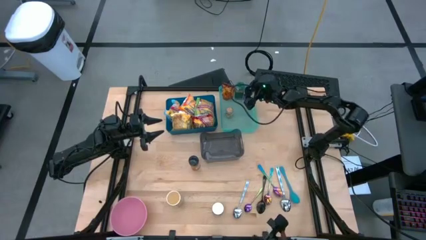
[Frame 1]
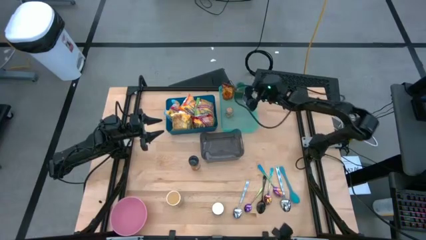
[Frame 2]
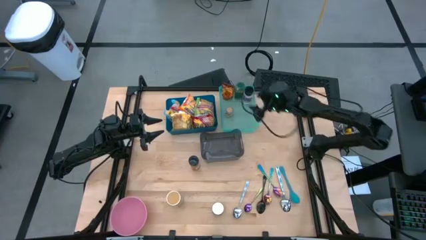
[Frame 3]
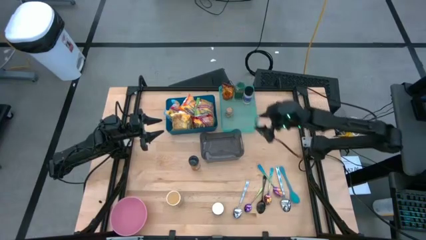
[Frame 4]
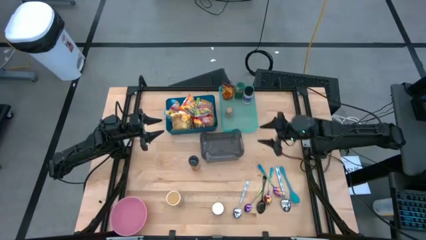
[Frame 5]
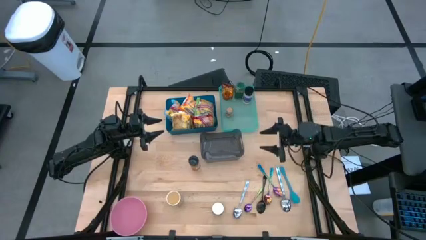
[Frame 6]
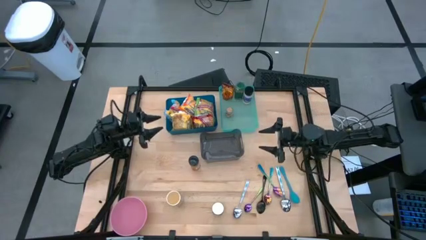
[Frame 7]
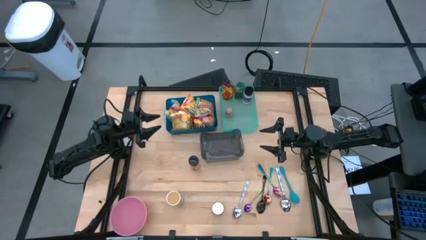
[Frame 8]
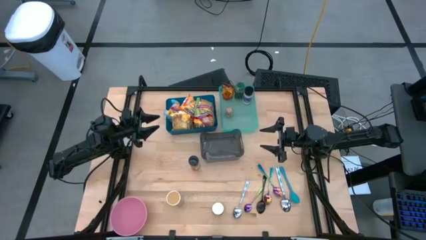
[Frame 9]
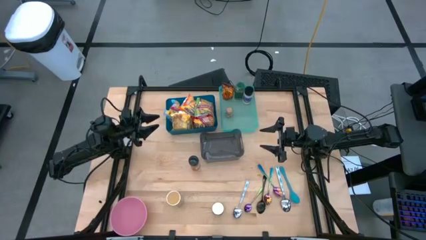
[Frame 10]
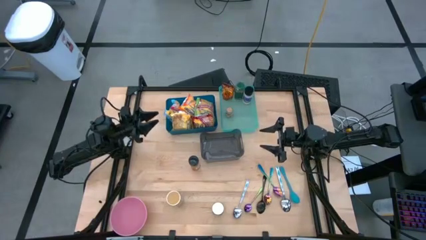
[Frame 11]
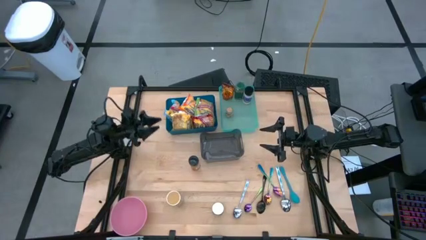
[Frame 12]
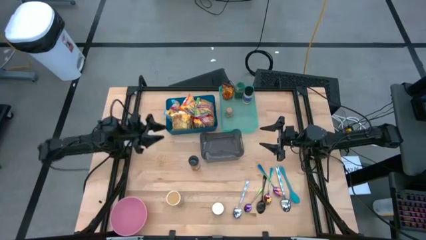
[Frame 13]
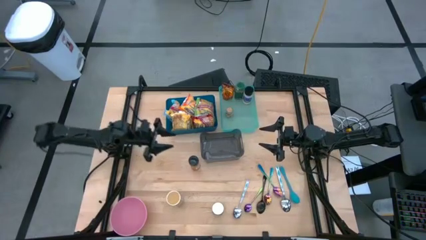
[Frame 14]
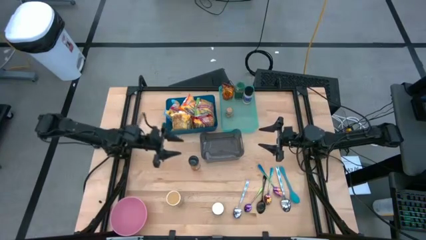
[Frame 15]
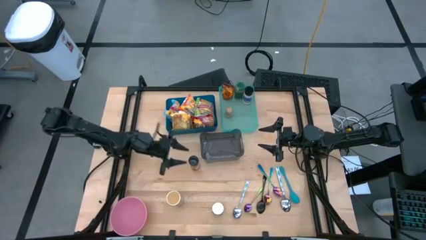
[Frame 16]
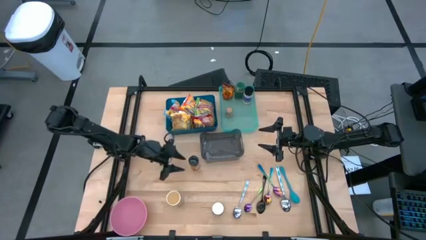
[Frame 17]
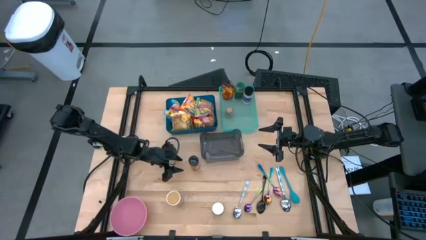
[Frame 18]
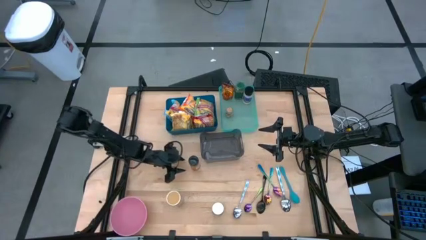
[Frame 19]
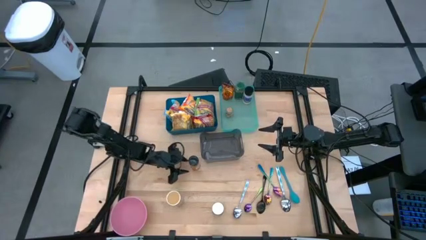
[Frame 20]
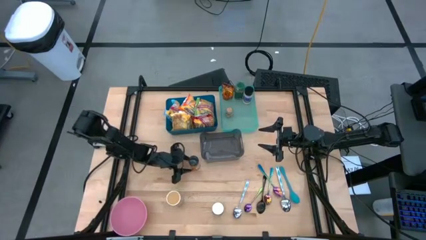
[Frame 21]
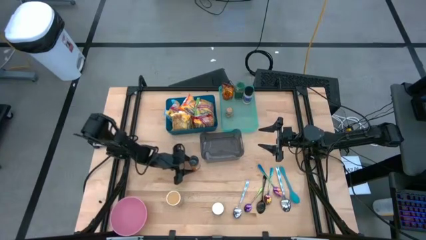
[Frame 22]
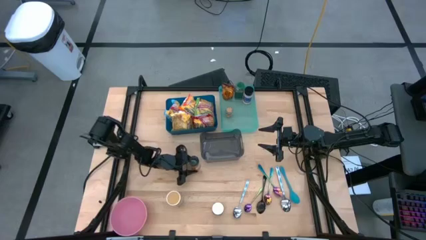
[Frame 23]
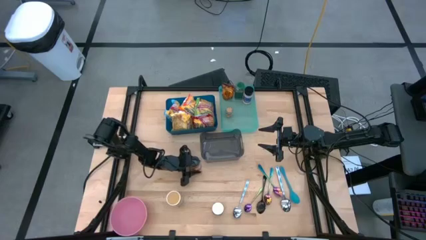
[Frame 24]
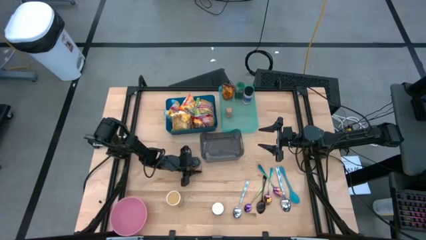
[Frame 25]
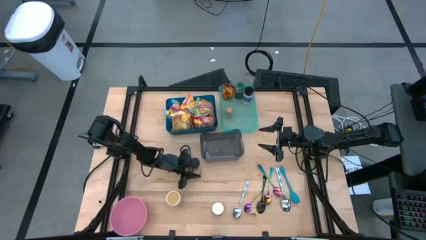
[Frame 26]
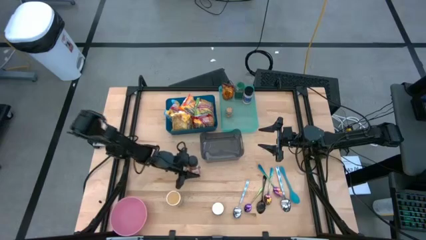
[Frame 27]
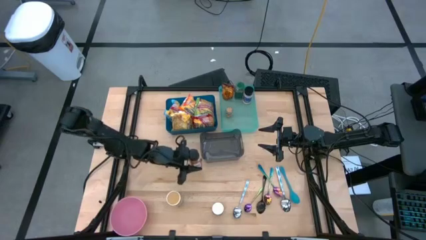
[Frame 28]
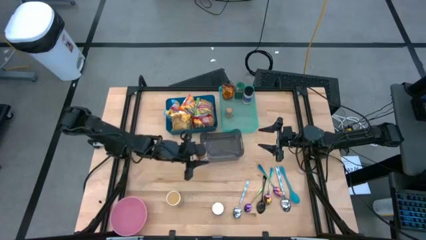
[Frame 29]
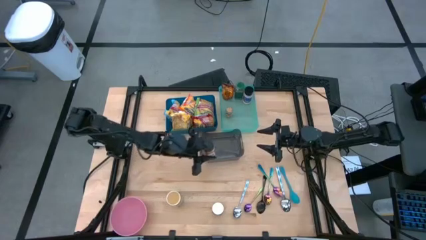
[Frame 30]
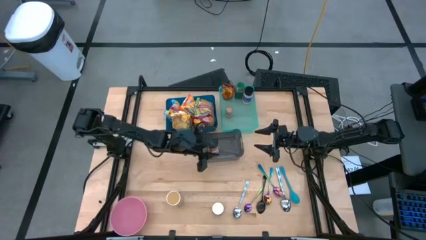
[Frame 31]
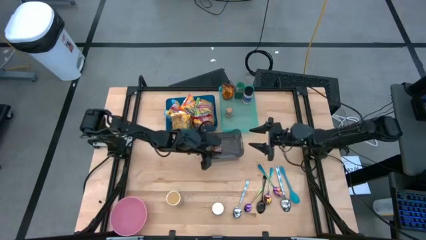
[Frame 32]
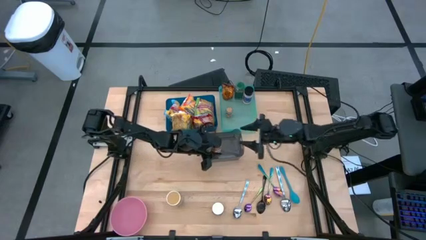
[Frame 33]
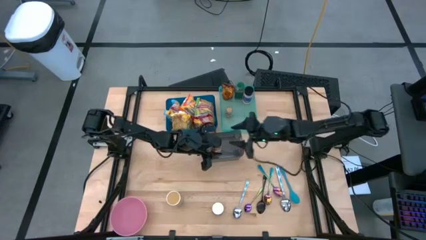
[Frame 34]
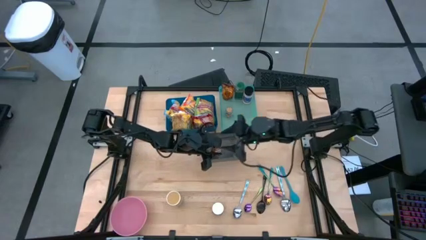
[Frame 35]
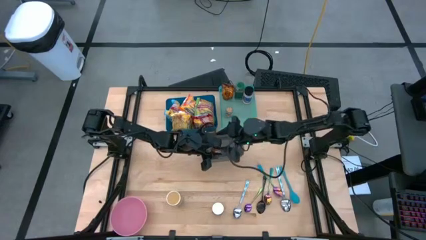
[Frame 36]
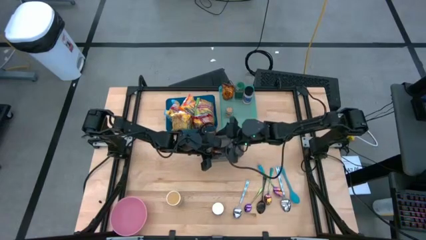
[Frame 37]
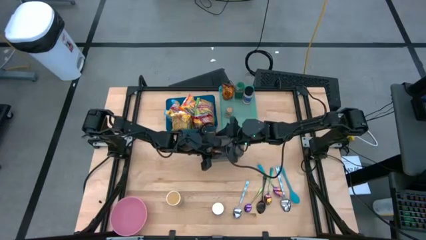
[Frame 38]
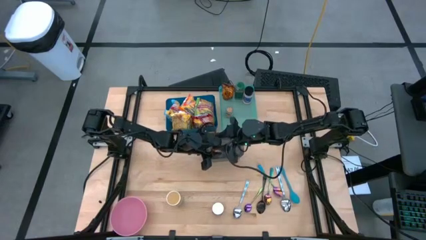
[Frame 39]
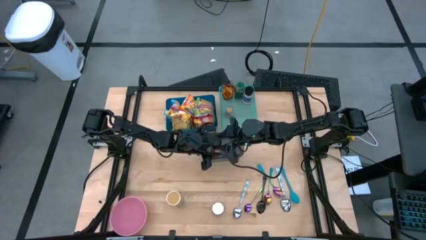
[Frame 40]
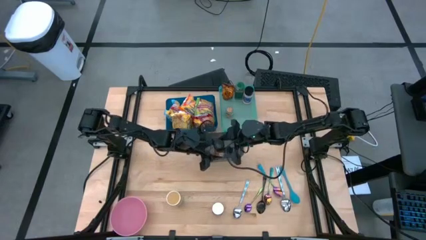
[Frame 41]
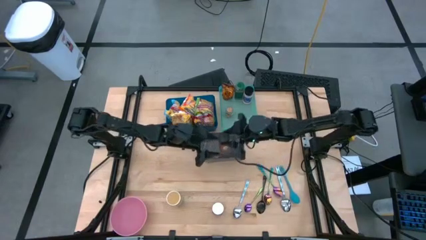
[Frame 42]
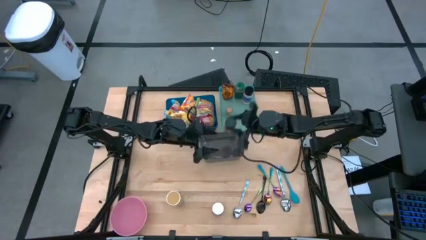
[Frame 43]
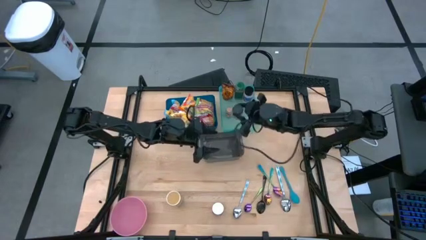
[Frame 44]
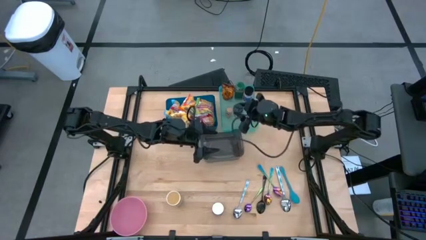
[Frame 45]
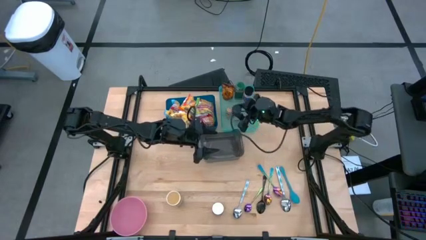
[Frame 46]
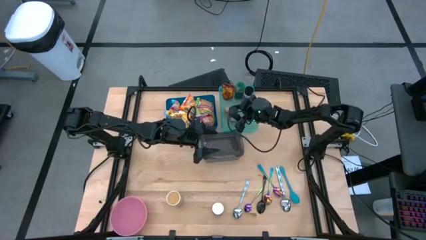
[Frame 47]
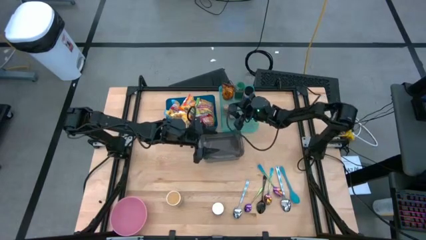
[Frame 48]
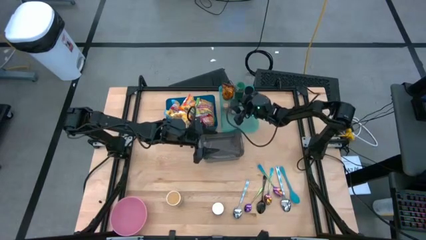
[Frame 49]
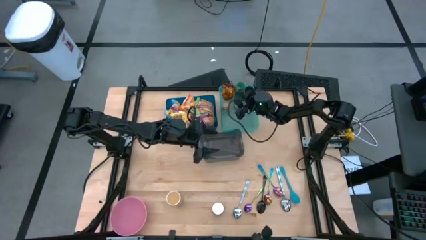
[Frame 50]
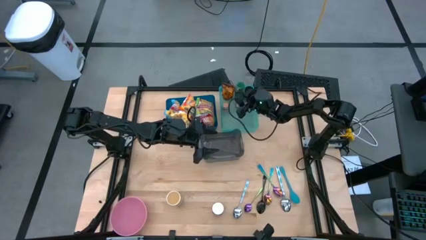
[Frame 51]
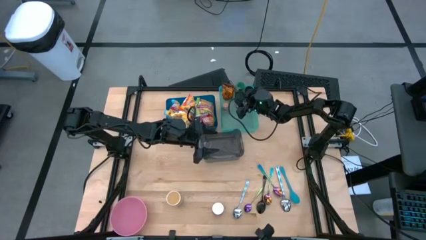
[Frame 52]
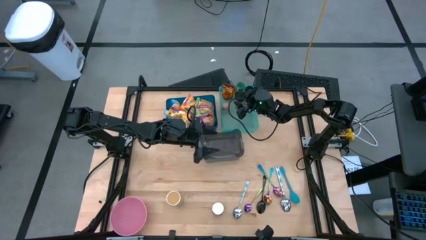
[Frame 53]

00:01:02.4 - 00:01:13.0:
Task: Pick & Place Food Item
Put the orange seasoning bottle into the green bin

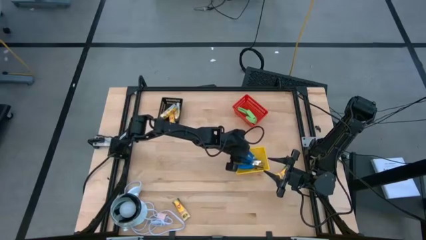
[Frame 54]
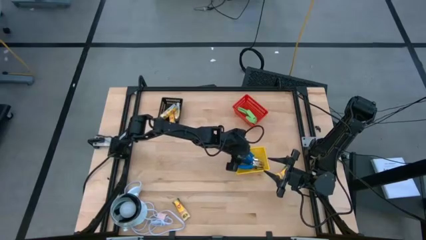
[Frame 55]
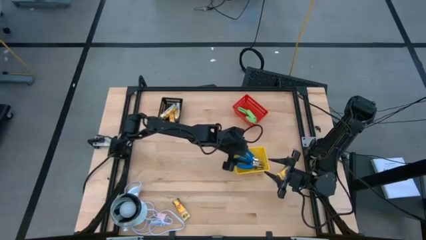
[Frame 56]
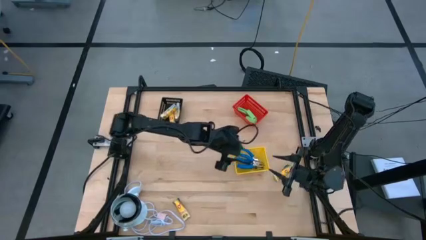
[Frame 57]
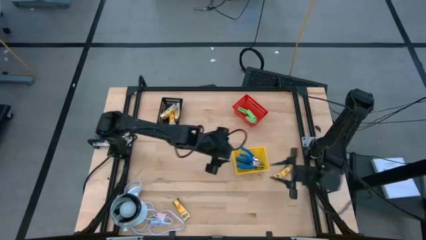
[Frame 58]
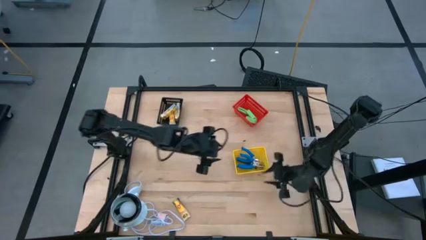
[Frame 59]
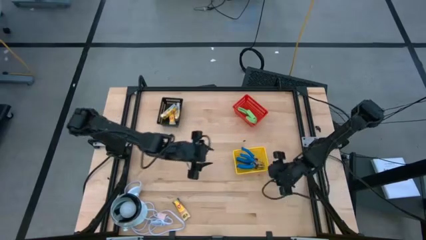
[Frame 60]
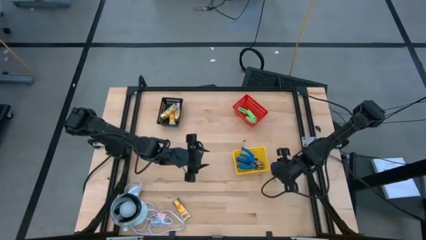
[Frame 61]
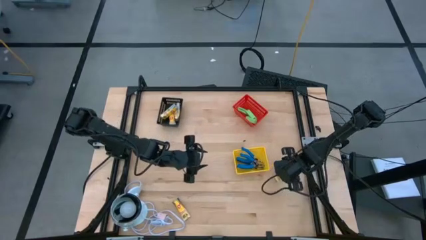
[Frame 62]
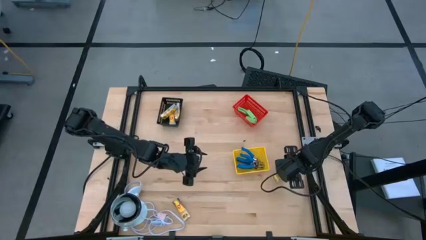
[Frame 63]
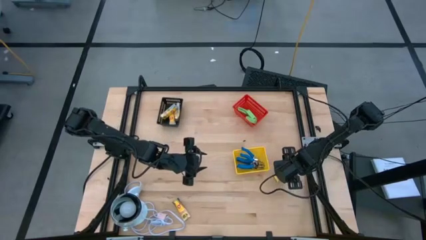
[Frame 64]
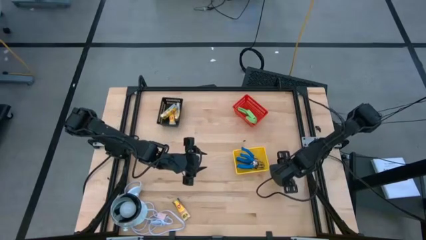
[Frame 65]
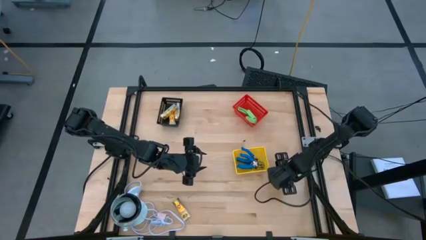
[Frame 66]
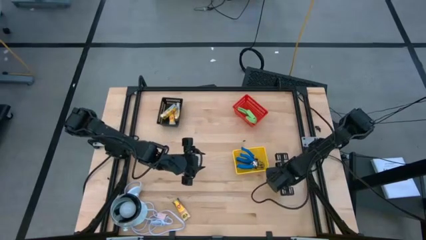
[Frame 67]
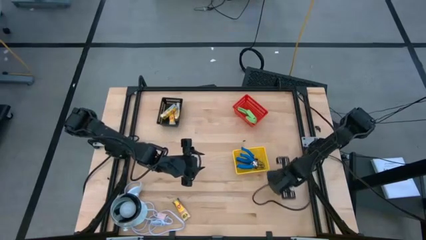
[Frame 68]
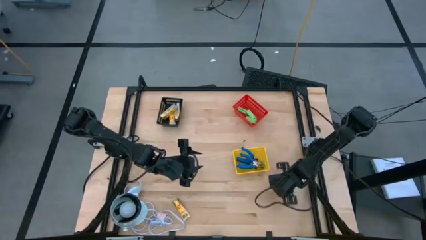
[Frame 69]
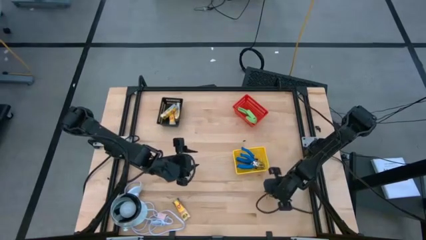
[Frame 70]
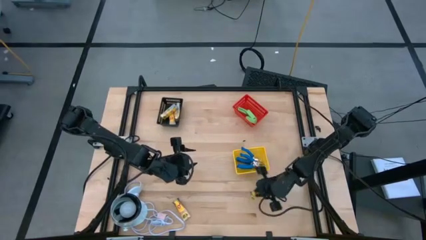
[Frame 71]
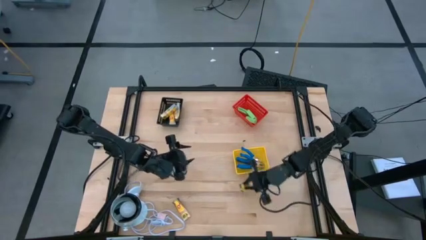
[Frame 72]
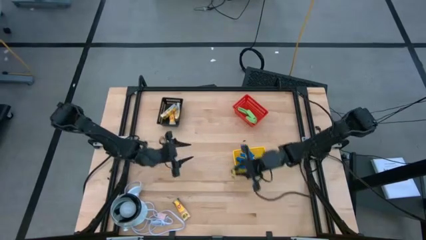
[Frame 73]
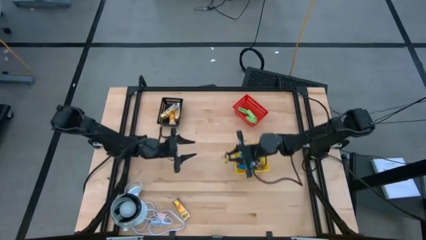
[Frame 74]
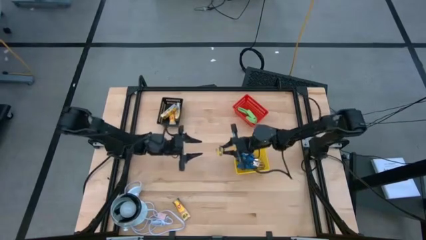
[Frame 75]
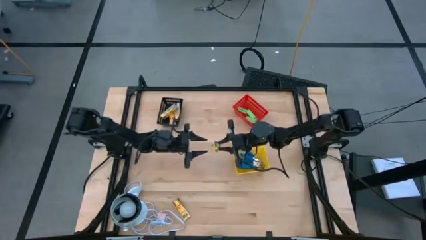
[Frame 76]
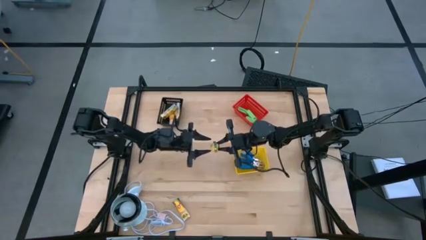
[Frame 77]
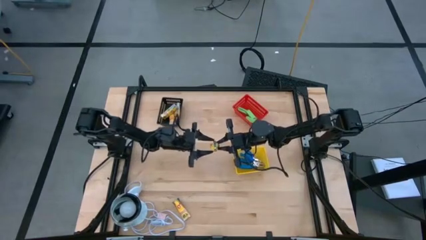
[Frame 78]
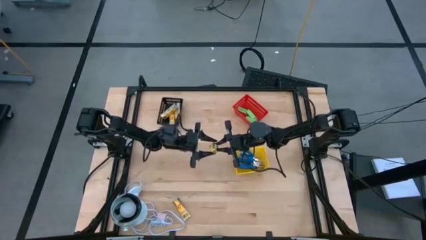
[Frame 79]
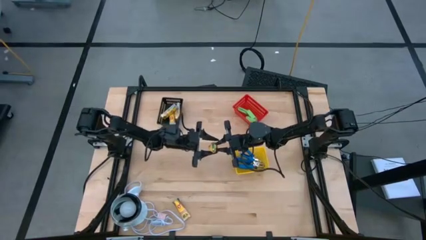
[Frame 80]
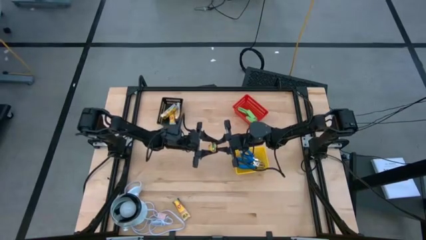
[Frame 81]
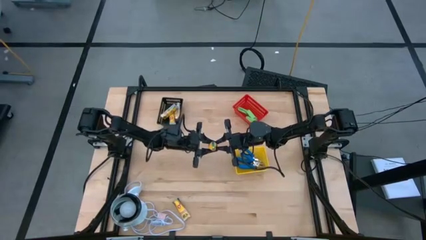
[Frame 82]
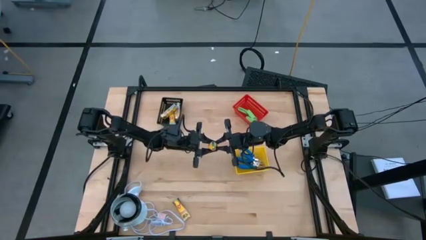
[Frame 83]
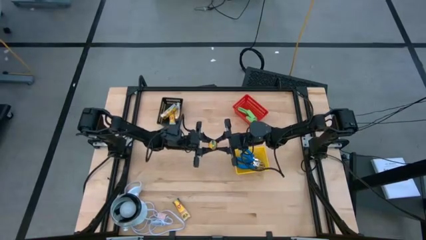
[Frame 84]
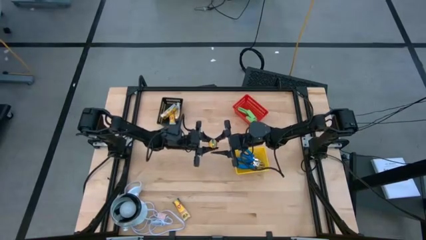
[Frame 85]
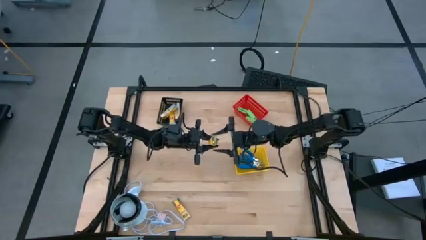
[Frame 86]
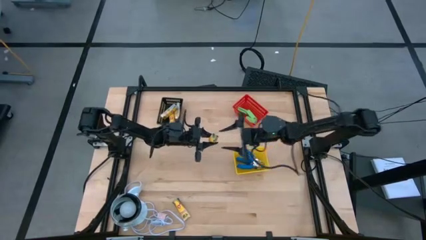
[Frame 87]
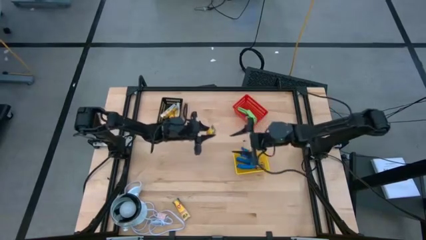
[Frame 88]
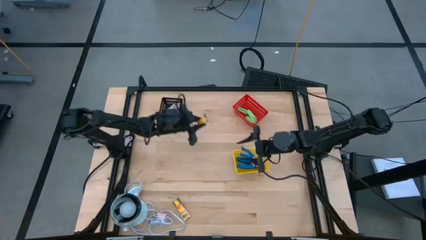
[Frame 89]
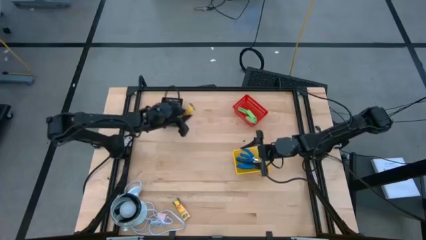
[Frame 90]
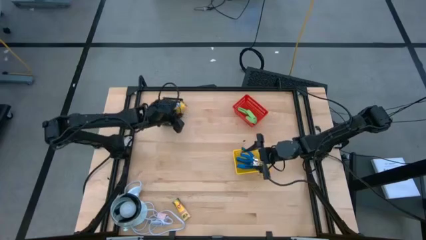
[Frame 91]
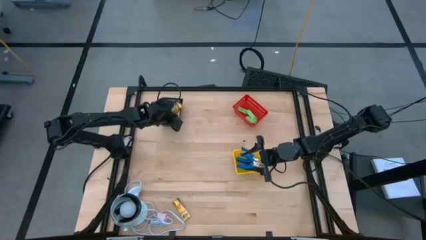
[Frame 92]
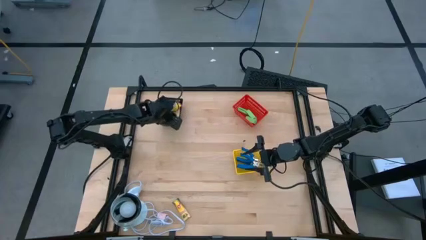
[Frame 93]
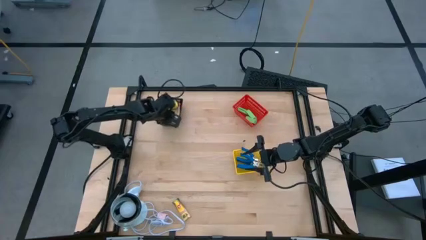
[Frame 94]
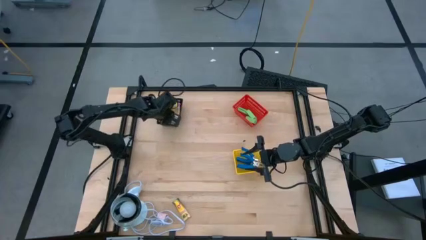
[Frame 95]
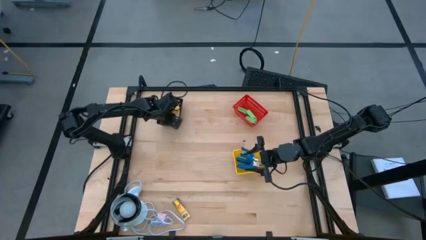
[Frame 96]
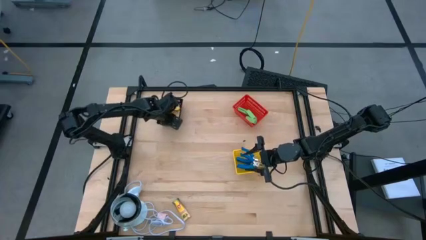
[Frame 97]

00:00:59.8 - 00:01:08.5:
Task: Pick & Place School Supplies
Put the yellow crayon pack into the black bin
